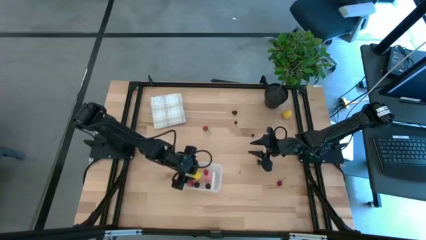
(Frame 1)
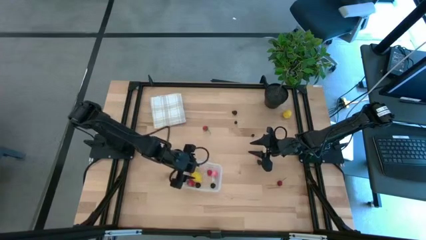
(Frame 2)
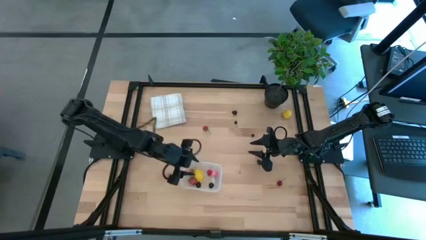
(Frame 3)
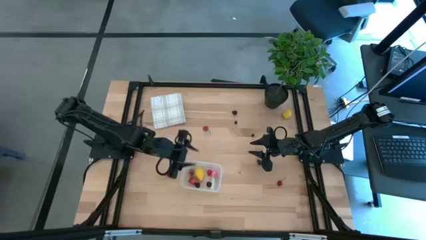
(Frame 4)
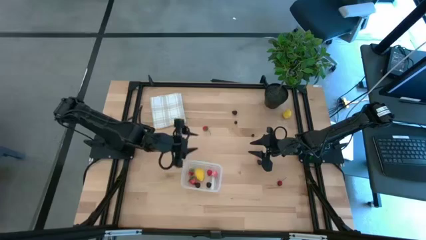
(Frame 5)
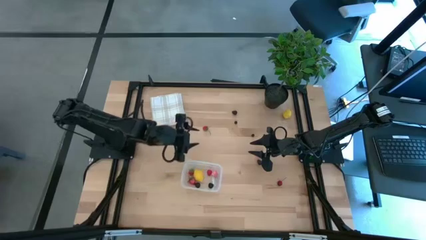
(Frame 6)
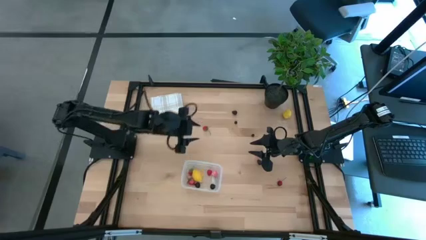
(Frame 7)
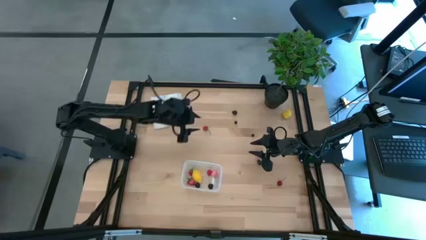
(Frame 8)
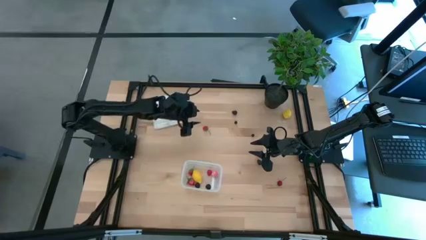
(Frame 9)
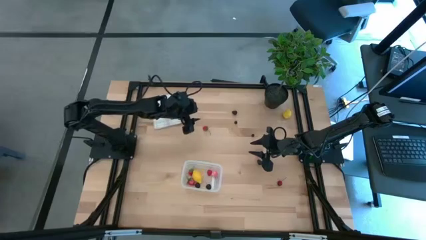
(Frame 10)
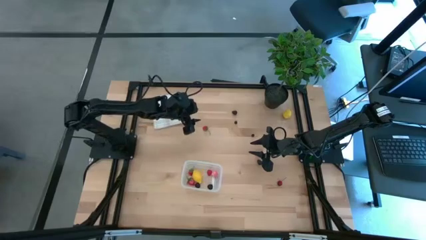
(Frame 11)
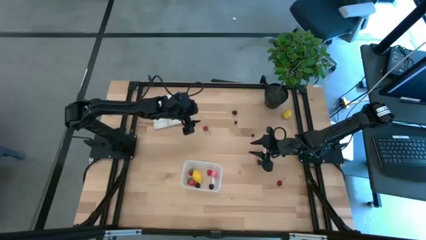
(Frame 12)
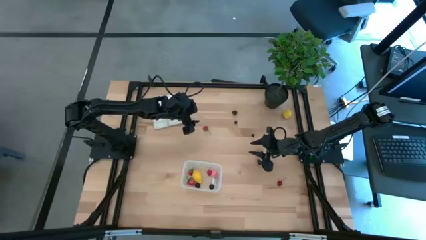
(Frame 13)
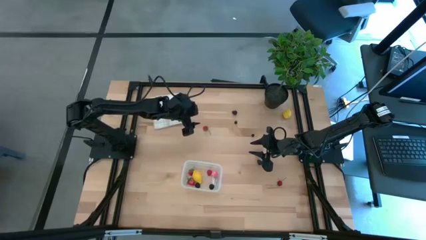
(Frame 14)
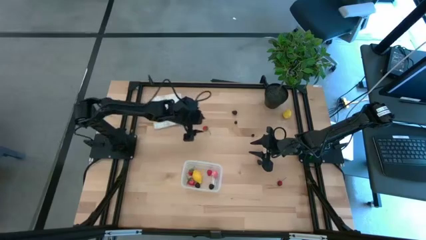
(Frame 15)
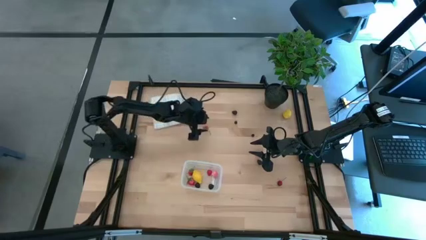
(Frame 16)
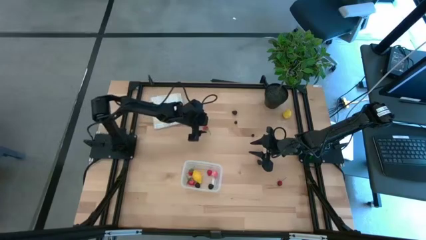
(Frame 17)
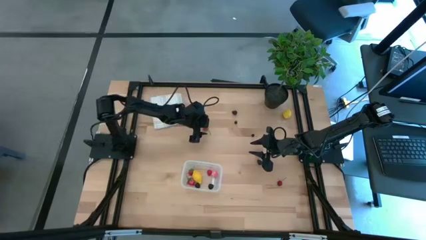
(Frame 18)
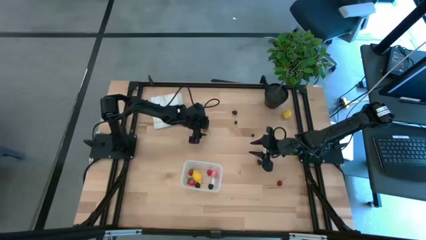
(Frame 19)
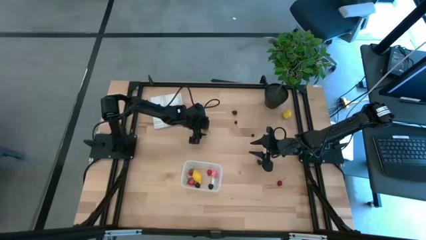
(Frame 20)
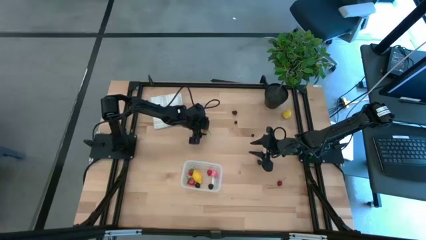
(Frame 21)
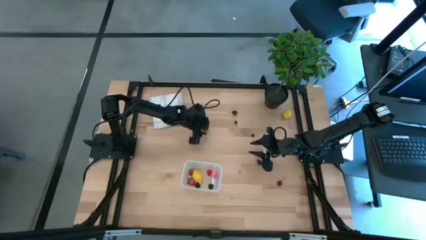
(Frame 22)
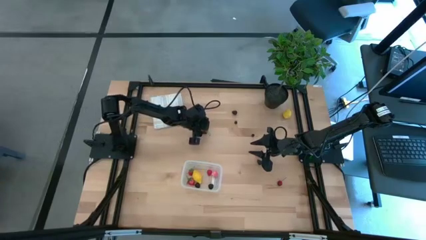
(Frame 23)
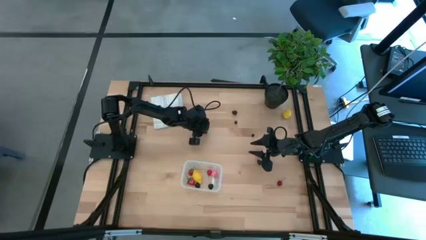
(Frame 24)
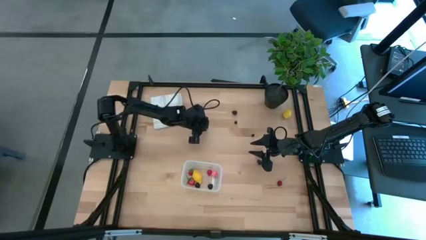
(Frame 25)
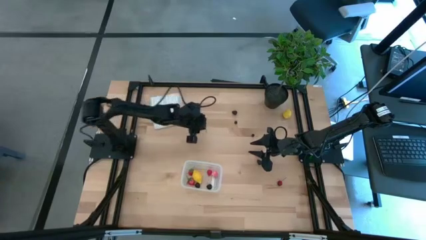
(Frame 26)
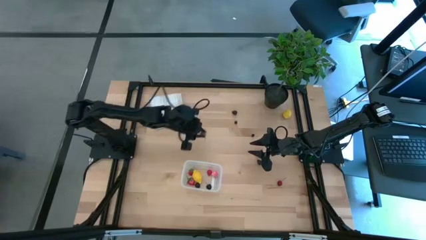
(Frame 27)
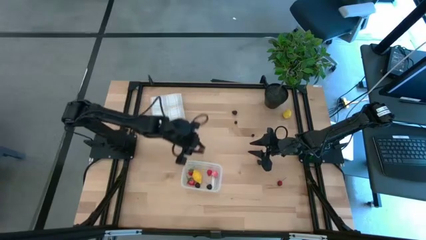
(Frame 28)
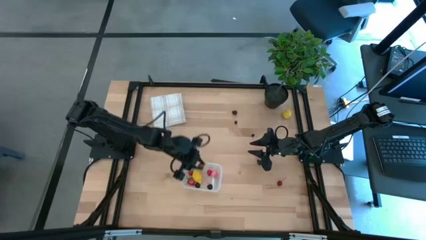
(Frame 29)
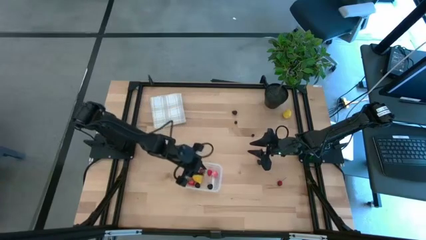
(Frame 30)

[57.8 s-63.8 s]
Task: Pick and placing Produce into tupperware
Put the strawberry into the transparent bin

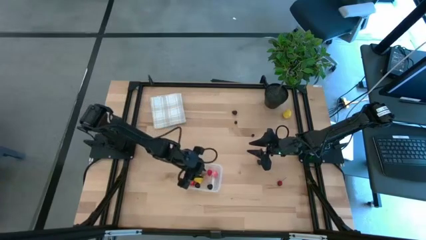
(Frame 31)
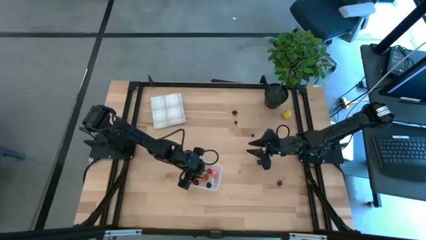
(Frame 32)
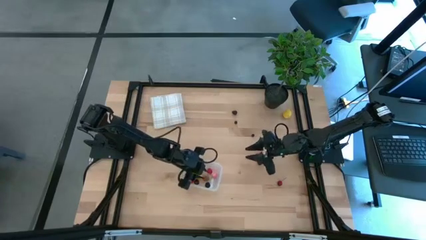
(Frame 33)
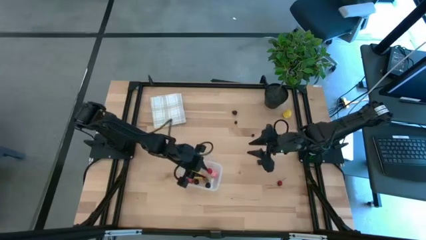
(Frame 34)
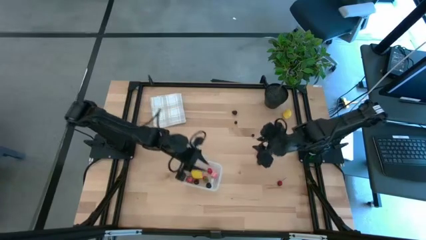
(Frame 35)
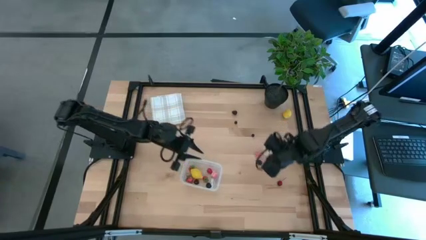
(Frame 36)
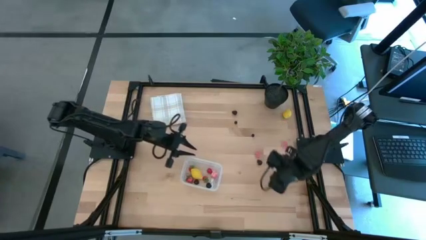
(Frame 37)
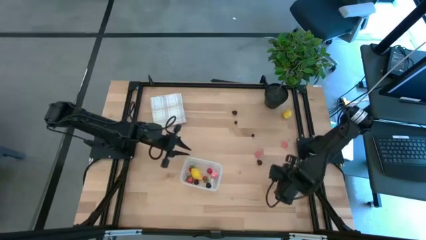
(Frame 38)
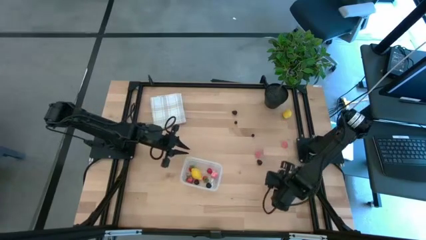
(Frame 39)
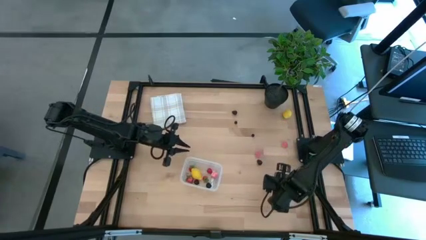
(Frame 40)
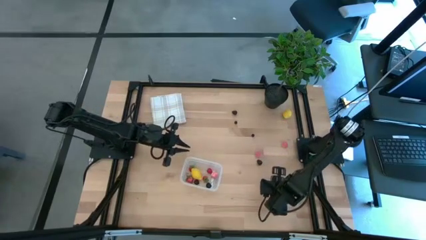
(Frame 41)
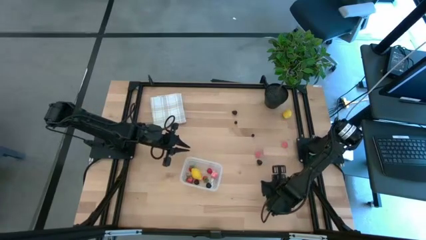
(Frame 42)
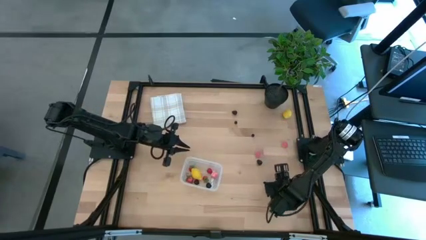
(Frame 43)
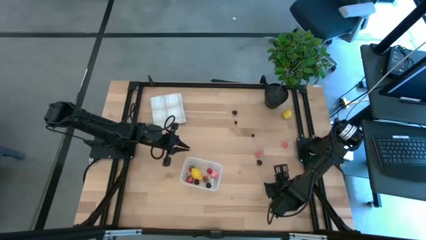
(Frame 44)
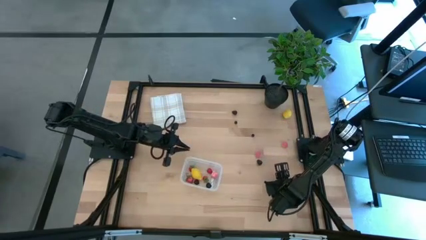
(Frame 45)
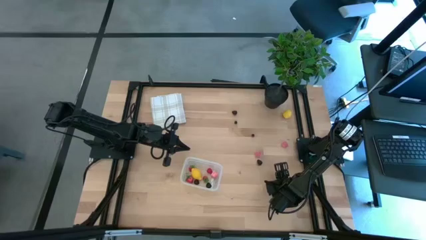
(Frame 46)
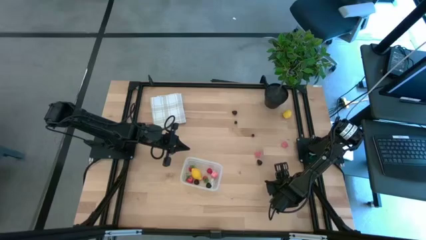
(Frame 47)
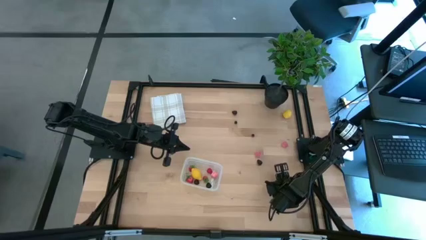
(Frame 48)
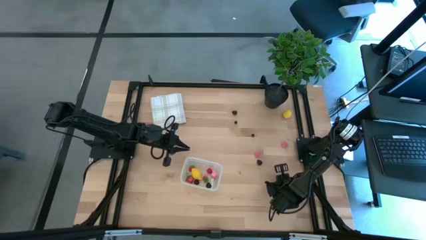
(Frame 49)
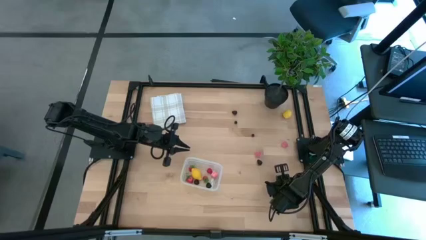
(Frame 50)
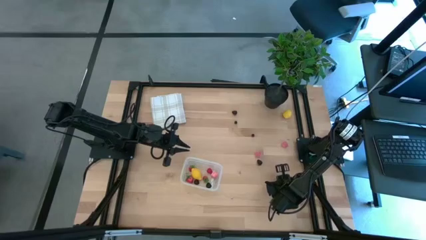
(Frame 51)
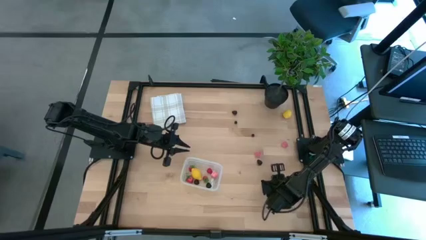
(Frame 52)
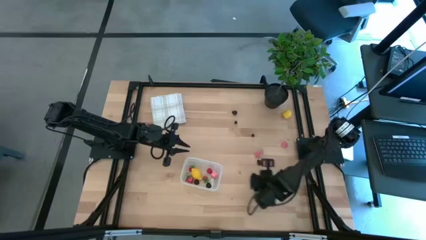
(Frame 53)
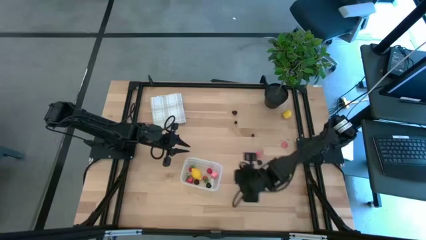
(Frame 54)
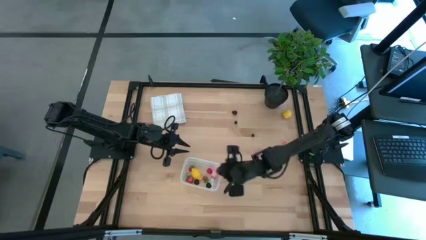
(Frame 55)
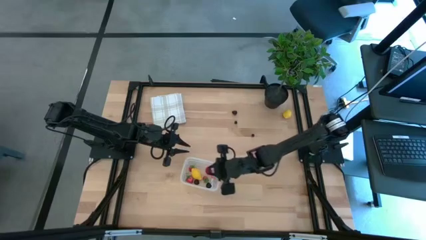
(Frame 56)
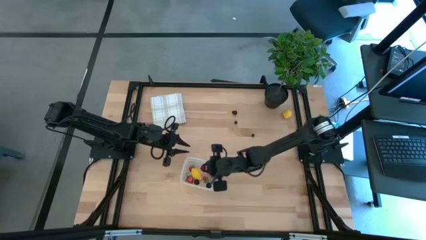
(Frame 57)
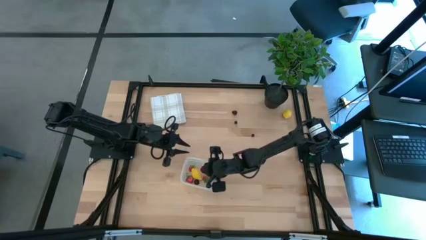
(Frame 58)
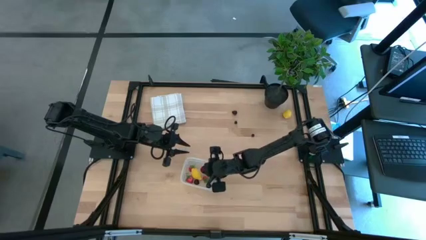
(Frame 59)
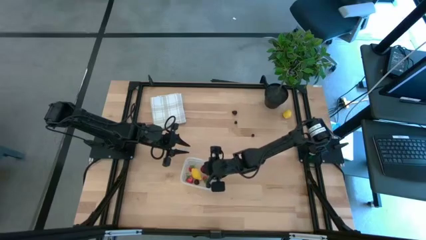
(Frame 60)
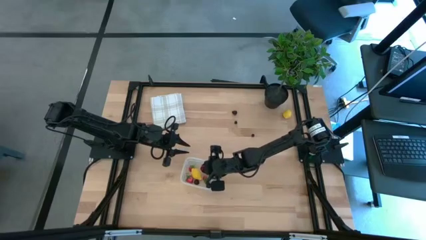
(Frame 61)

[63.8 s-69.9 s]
Put the red cherry into the transparent bin

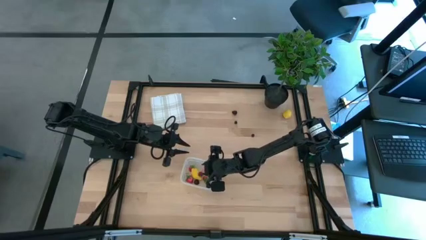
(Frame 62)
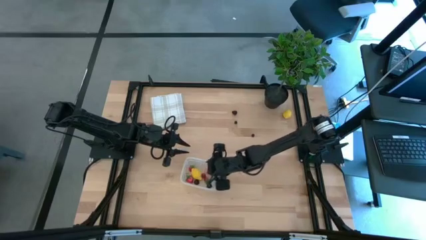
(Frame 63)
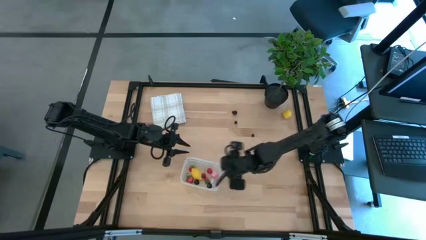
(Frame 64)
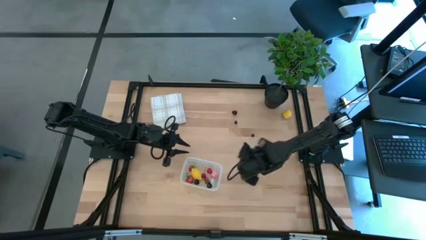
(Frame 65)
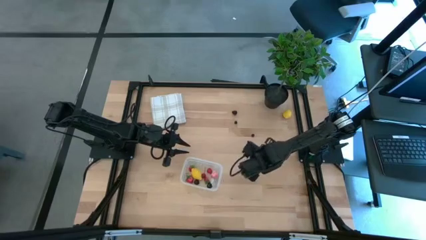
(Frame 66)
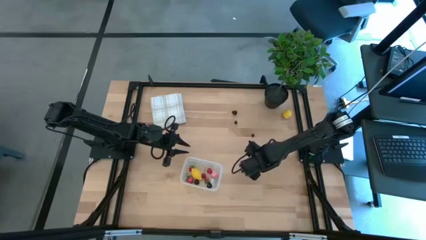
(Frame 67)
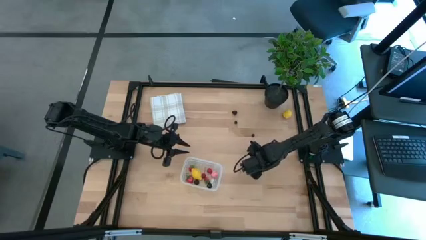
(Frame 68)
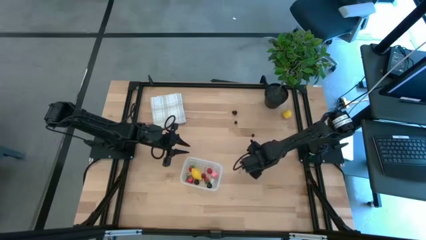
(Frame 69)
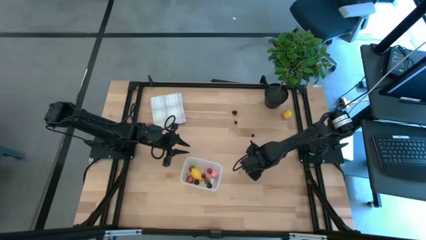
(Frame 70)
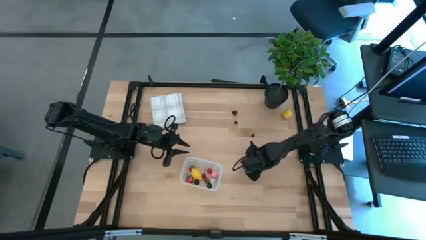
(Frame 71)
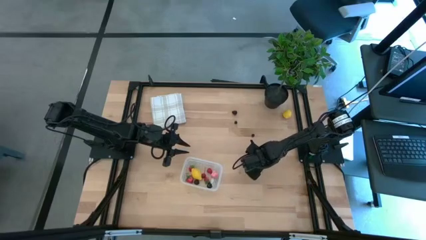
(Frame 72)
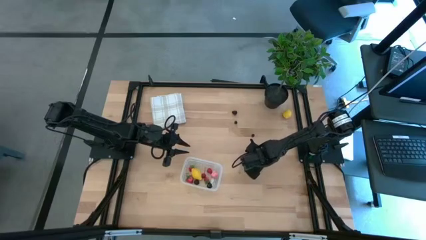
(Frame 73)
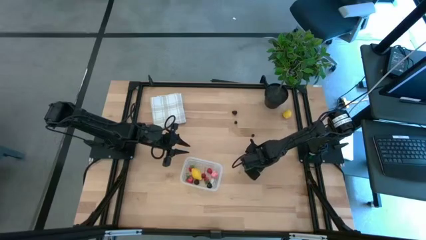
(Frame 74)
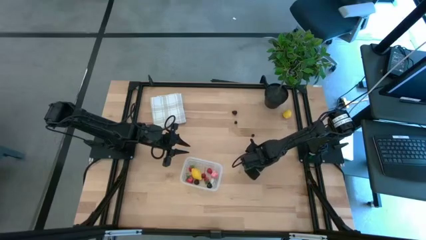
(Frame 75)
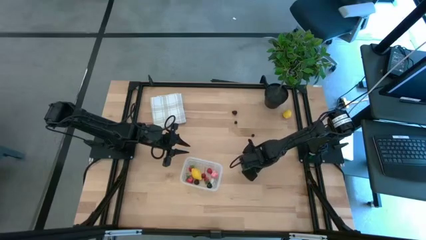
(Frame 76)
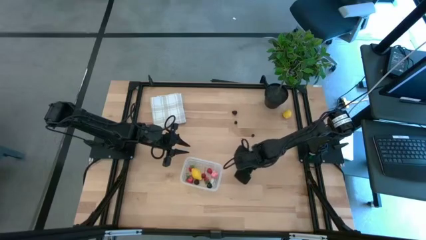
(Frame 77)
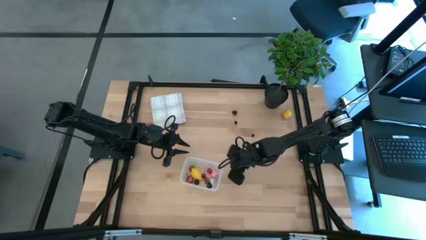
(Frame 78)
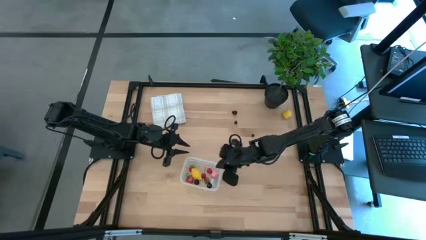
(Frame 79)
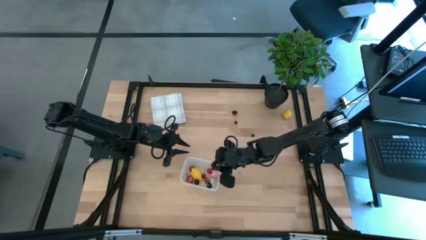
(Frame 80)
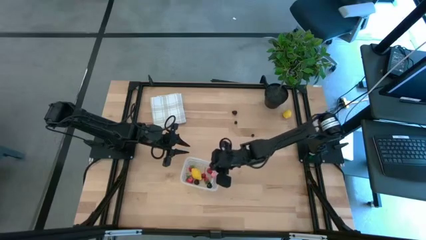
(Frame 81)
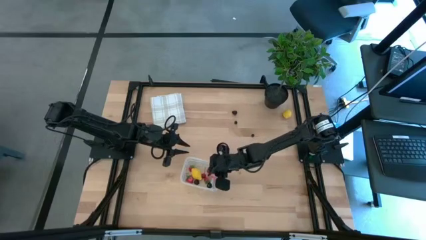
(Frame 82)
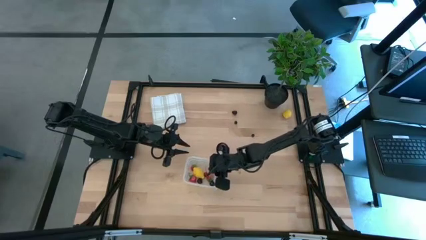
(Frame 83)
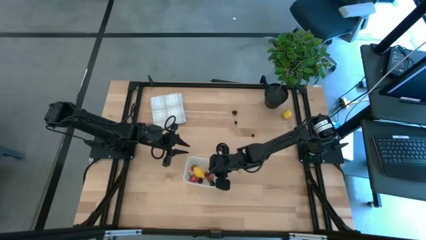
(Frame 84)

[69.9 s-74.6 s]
Put the bottom blackberry into the transparent bin
